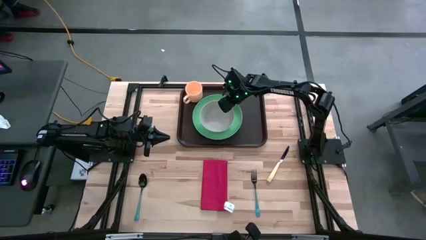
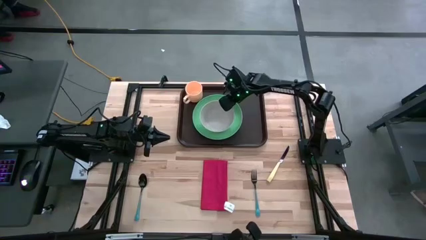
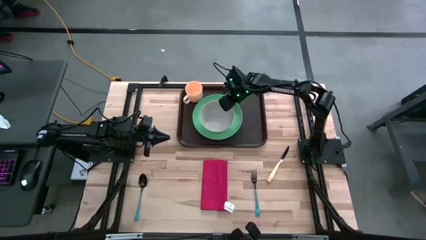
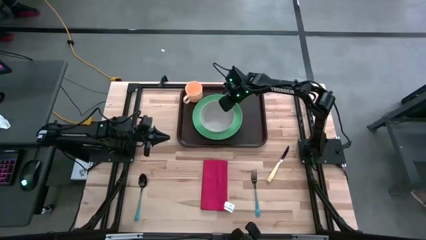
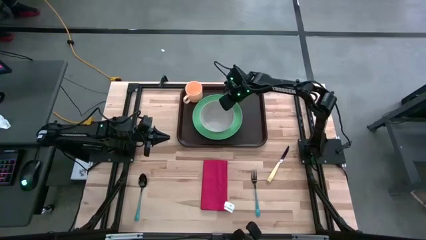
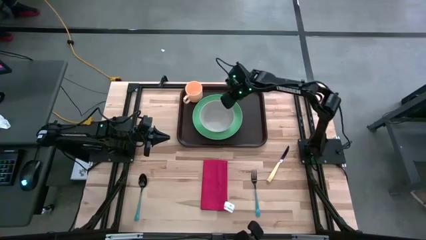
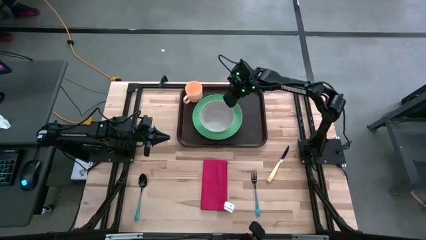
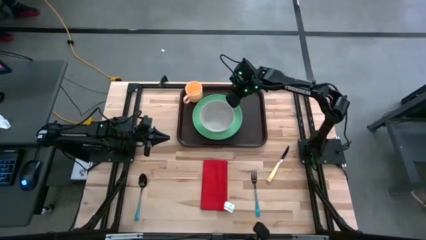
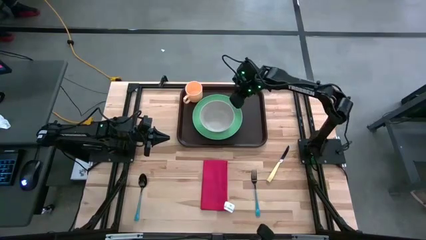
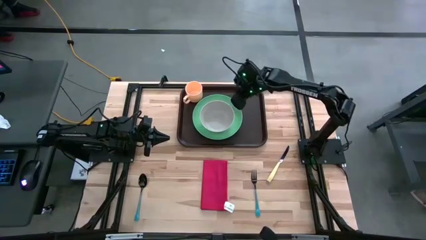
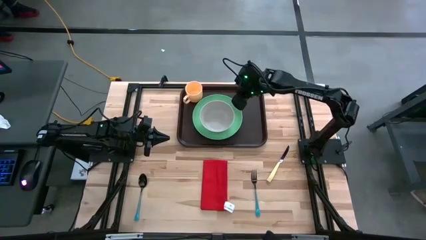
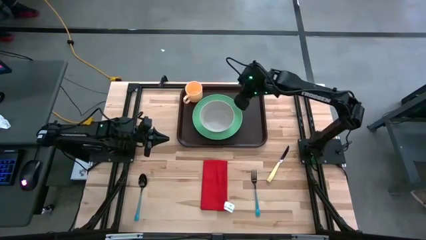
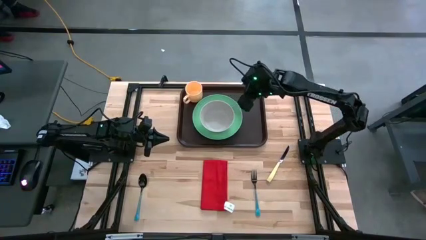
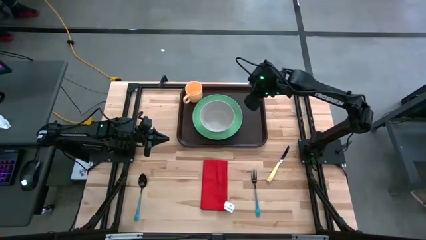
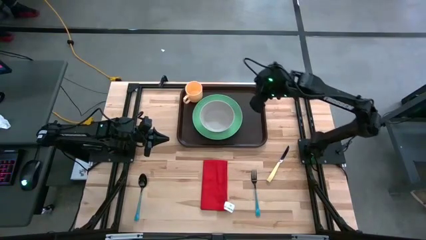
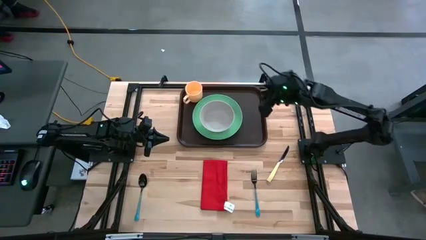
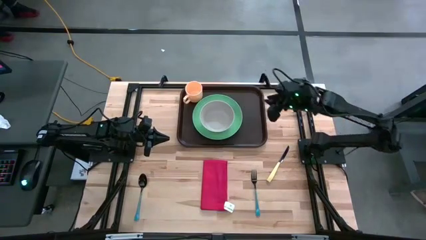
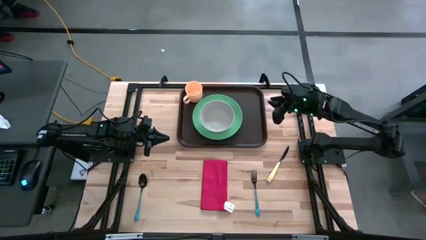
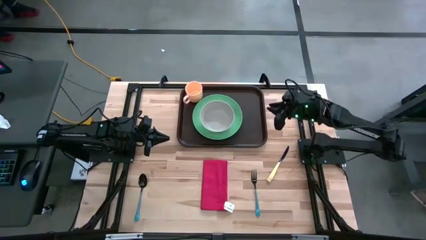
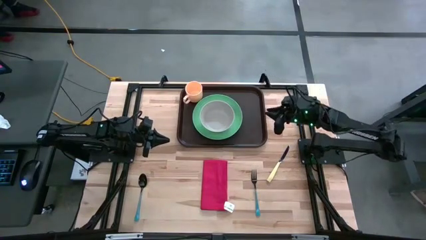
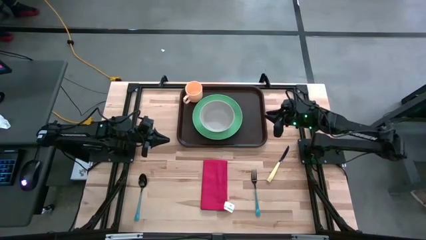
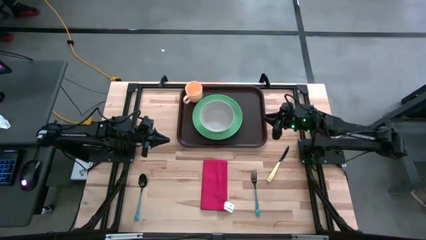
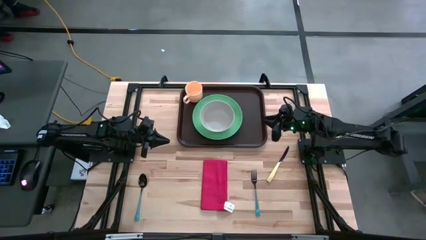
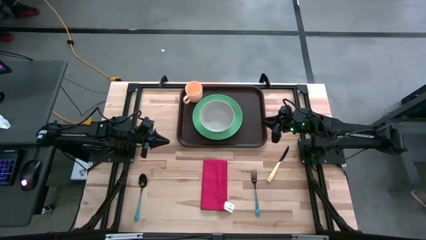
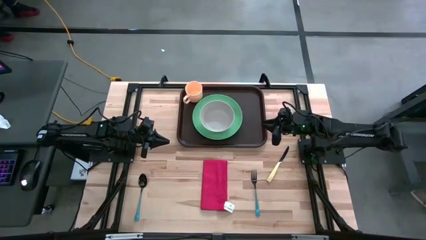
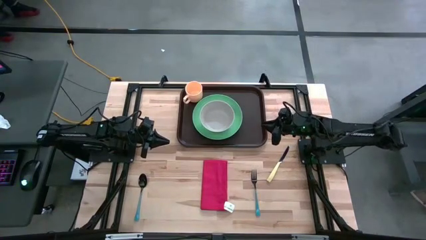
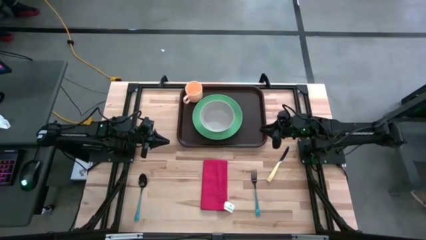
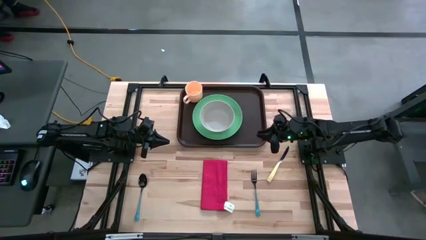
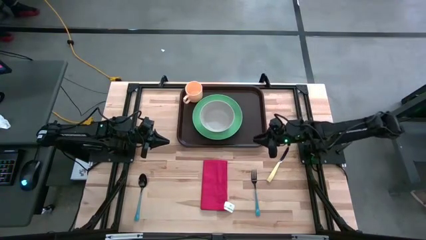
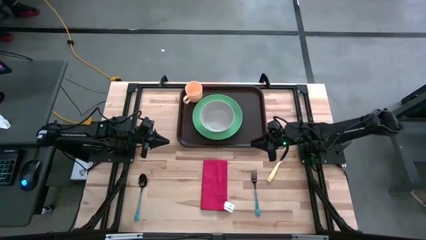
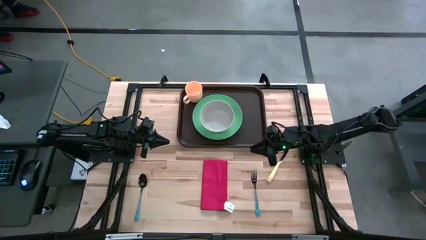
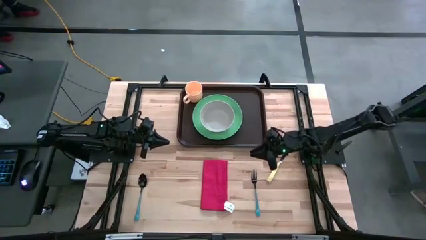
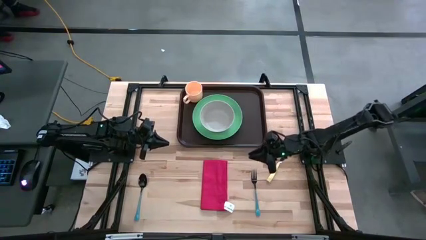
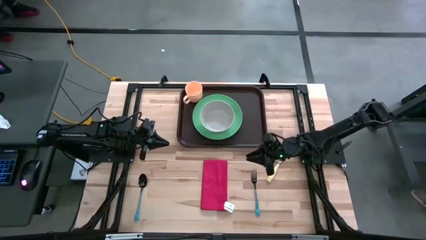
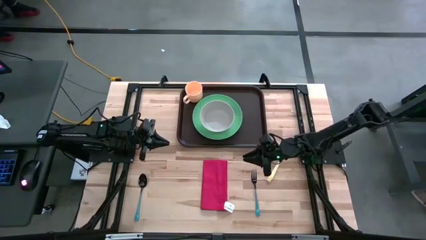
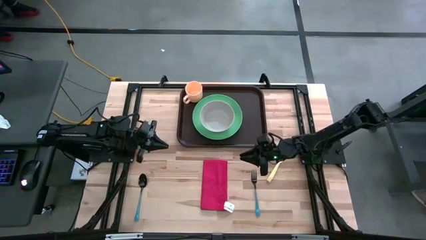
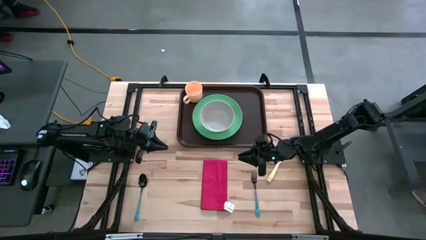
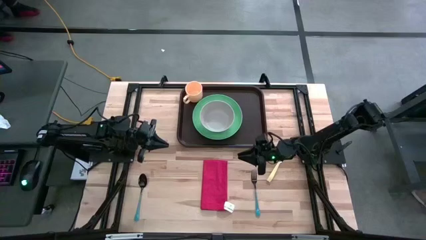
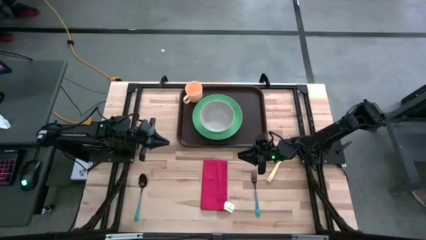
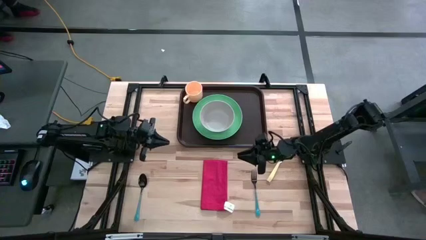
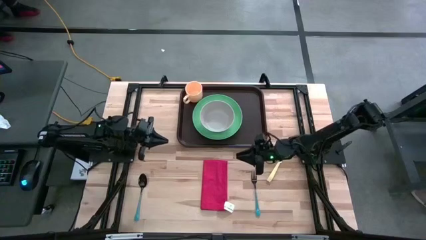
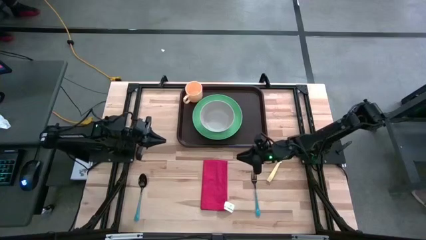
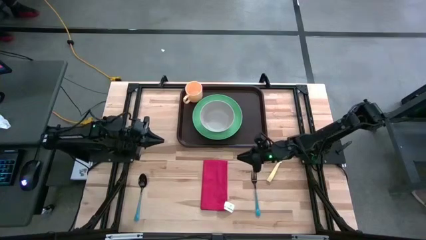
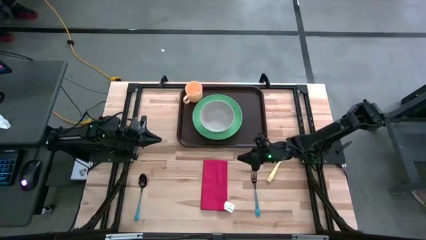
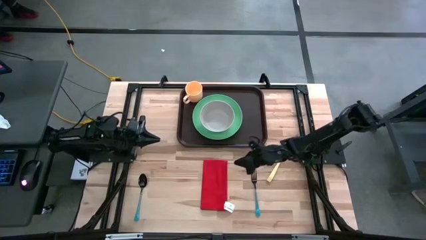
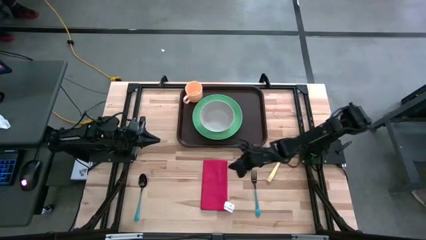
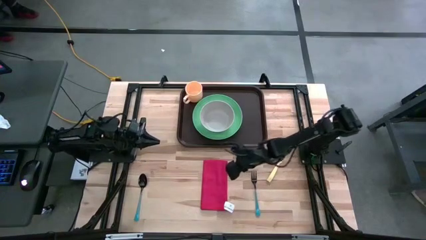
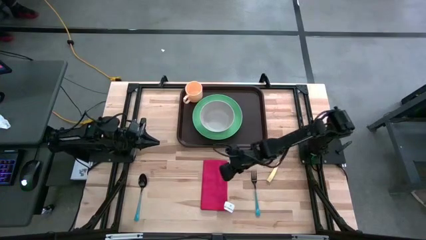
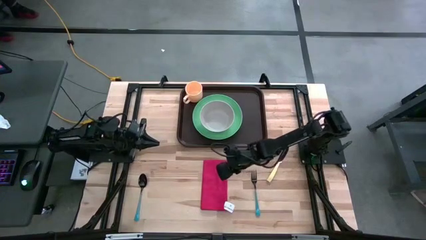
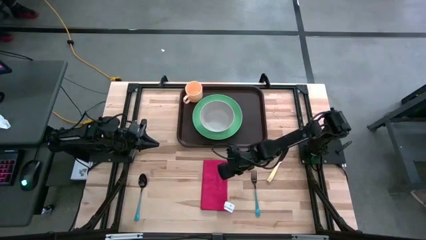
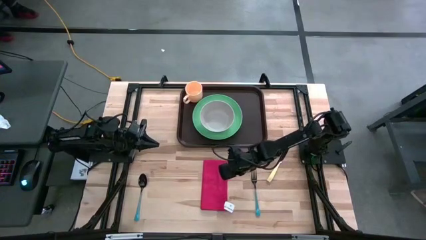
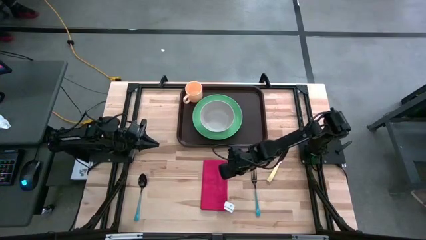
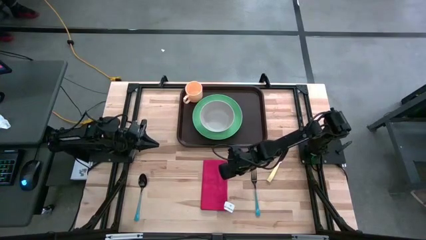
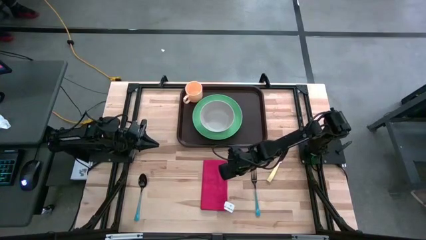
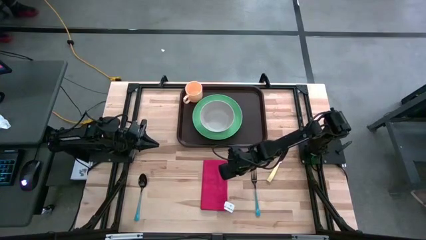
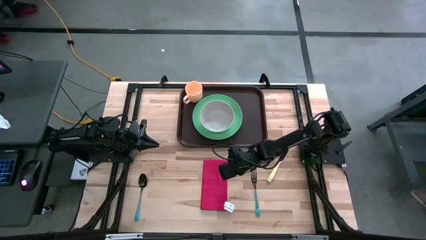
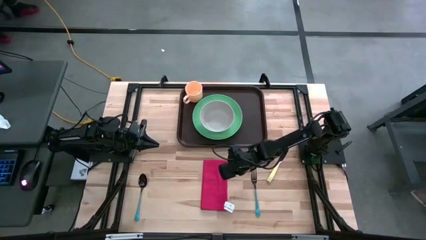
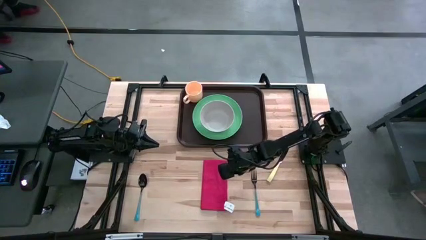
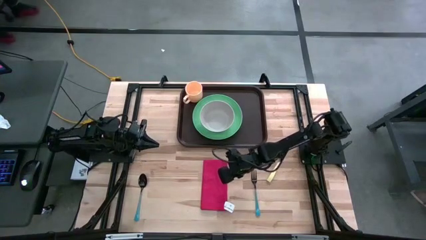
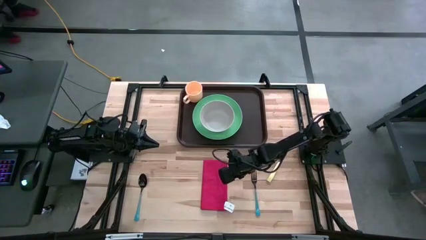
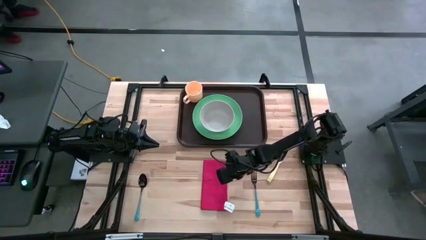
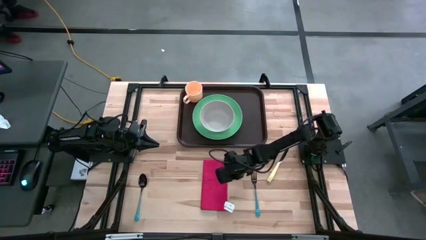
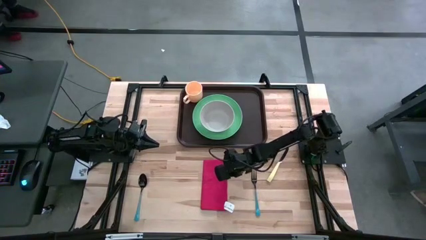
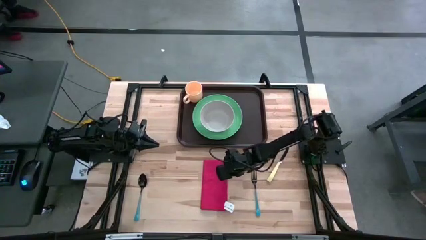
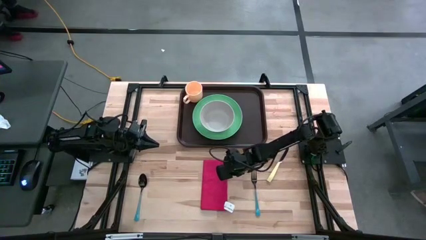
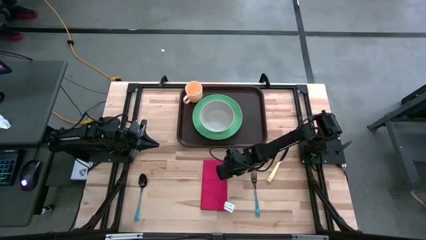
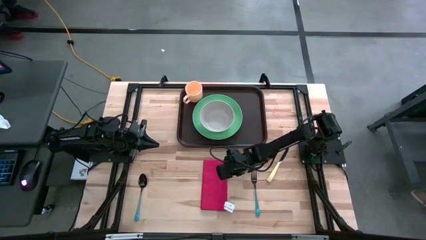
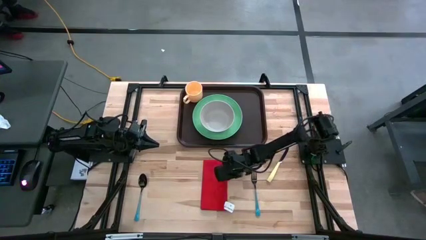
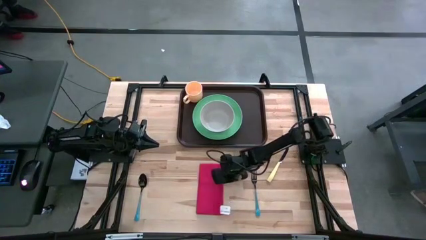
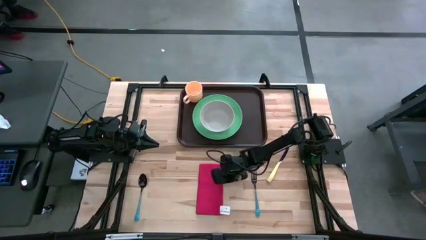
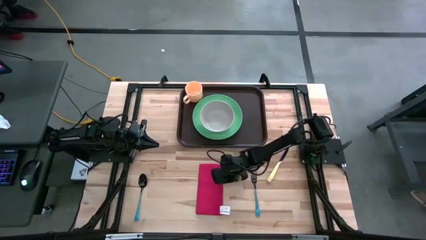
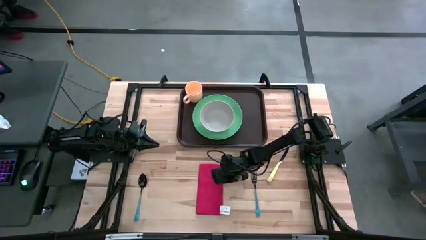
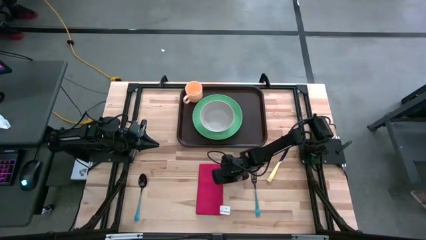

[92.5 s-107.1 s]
Task: Set up tray
Put the red table napkin on the brown tray to the right of the green plate

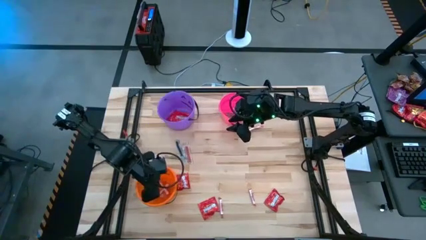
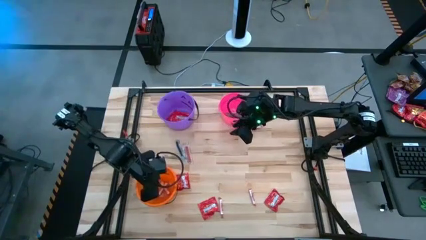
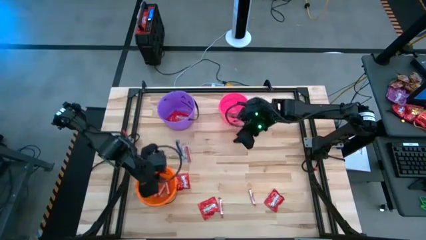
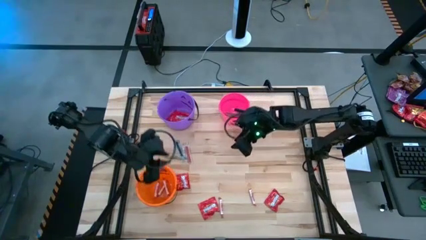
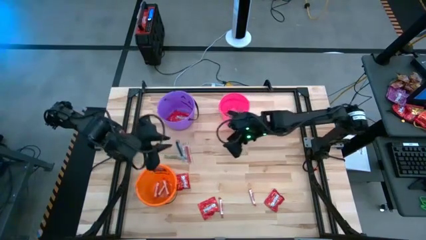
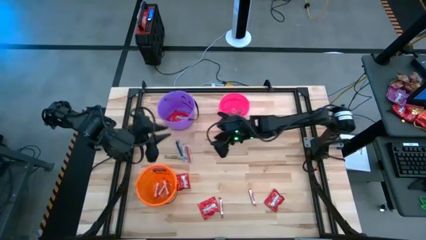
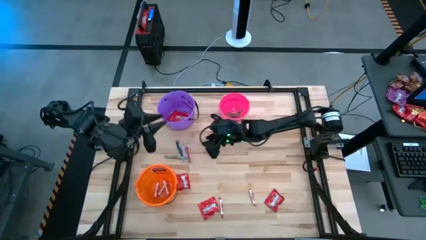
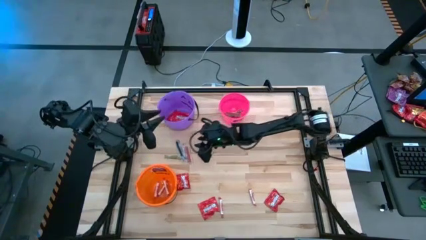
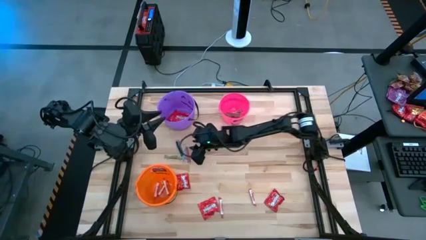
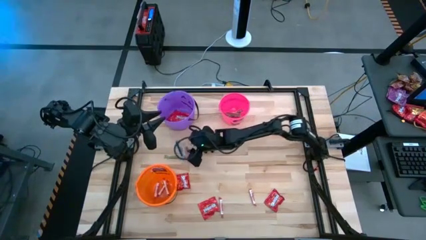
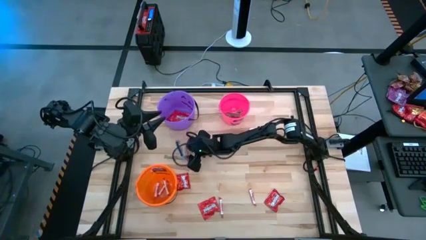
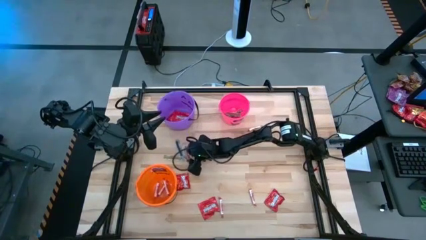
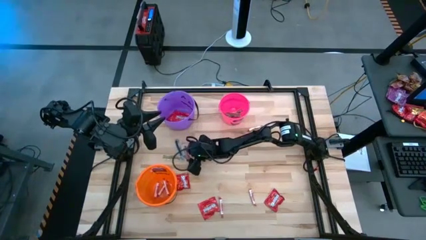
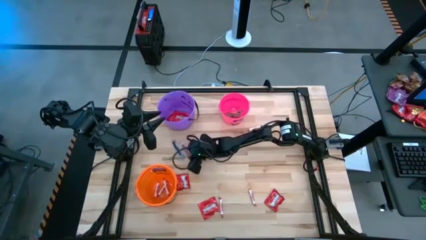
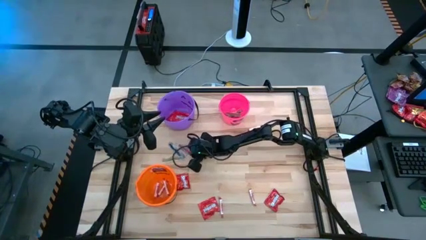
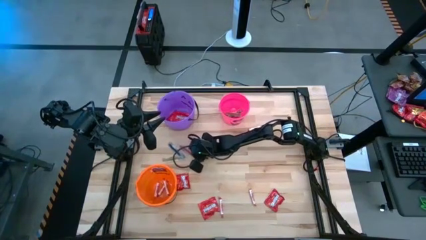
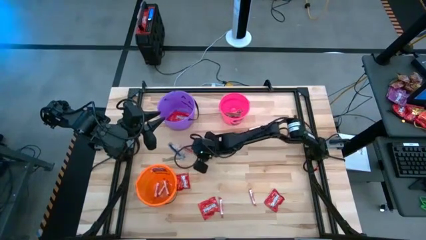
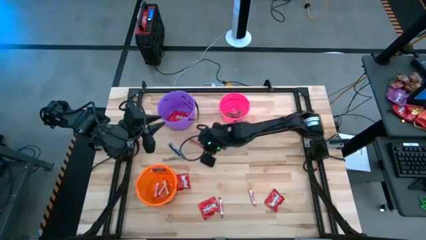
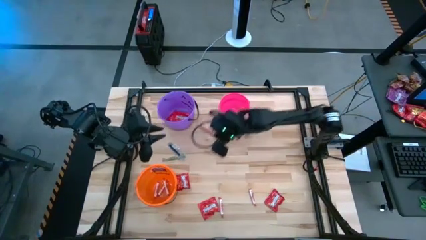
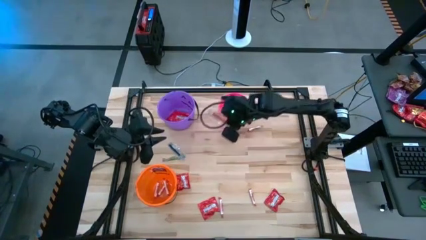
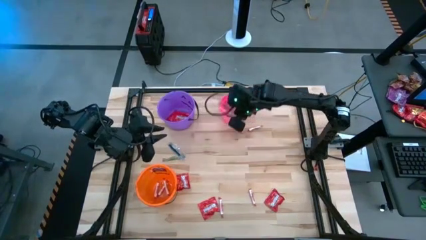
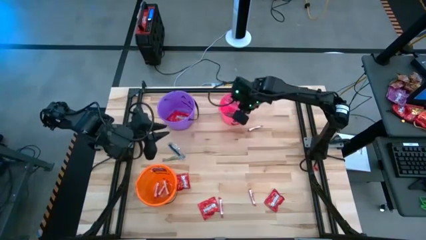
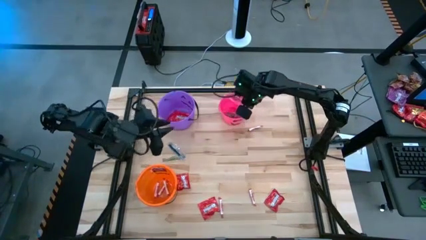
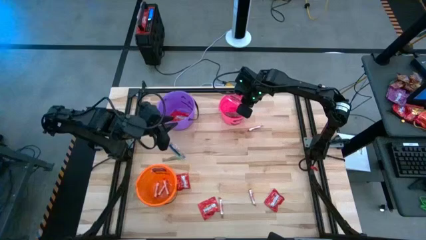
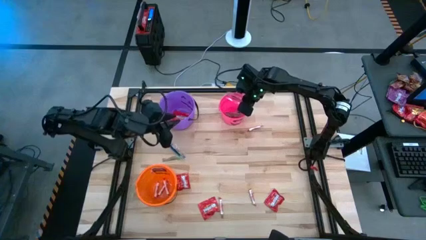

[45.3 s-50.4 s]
Task: Sort candy by brand, put in halloween buckets
Put the transparent red candy into the pink bucket
